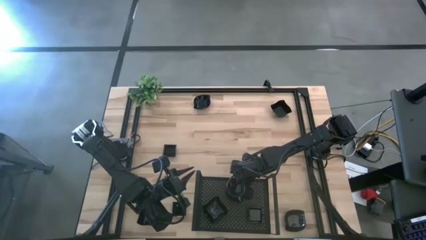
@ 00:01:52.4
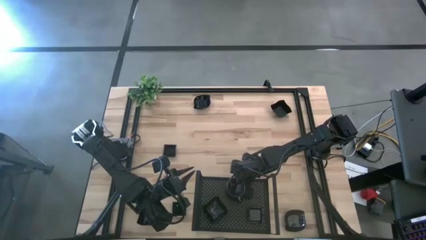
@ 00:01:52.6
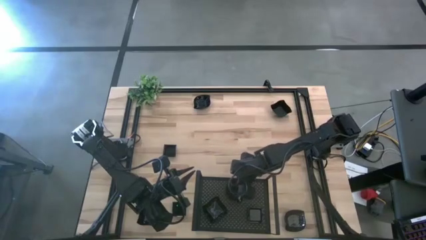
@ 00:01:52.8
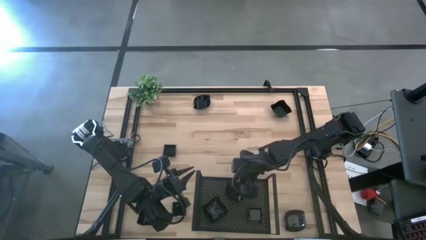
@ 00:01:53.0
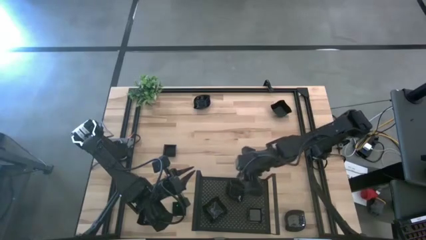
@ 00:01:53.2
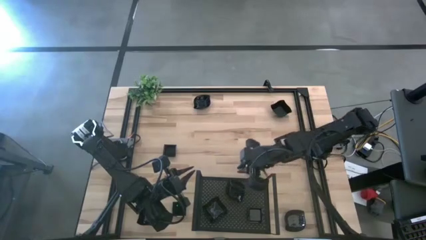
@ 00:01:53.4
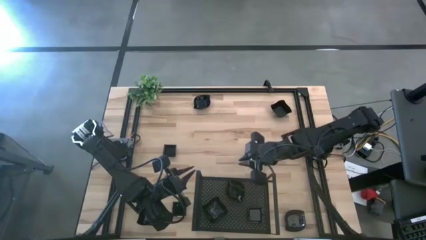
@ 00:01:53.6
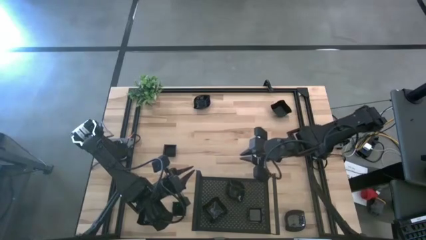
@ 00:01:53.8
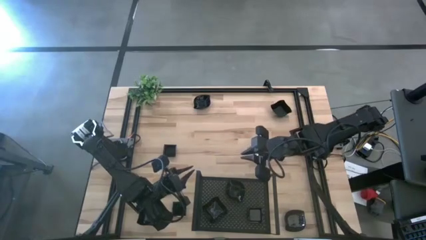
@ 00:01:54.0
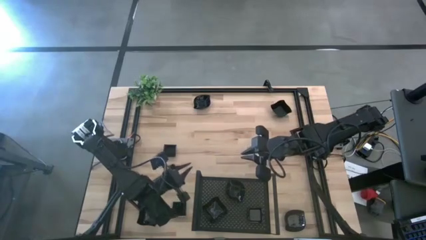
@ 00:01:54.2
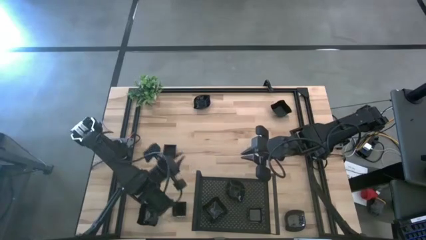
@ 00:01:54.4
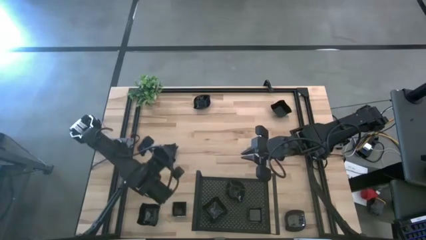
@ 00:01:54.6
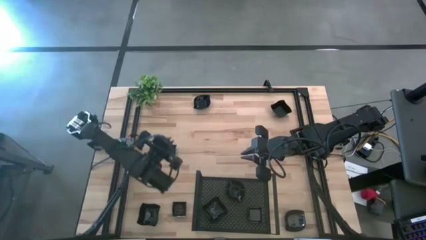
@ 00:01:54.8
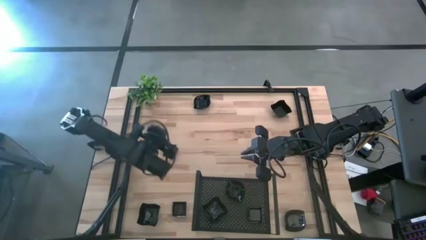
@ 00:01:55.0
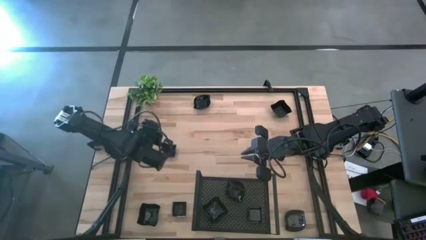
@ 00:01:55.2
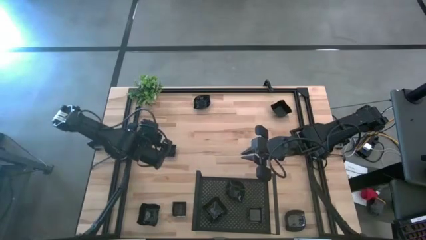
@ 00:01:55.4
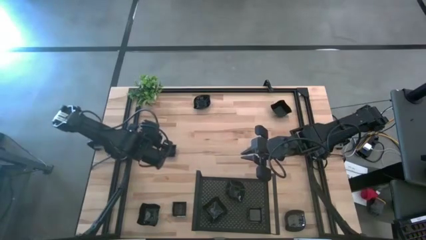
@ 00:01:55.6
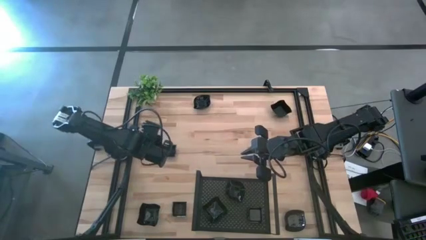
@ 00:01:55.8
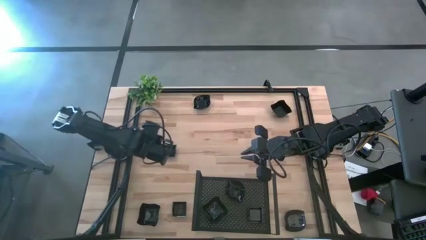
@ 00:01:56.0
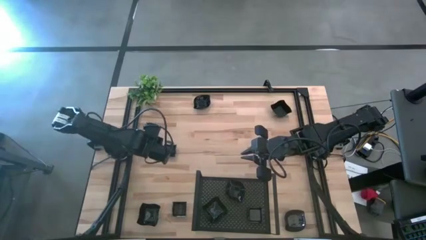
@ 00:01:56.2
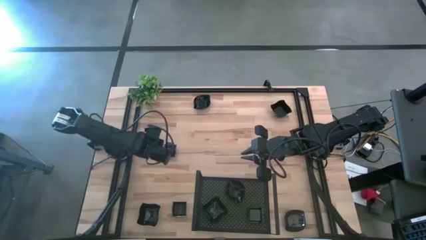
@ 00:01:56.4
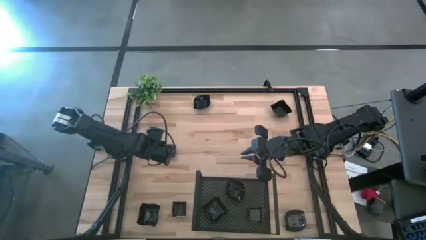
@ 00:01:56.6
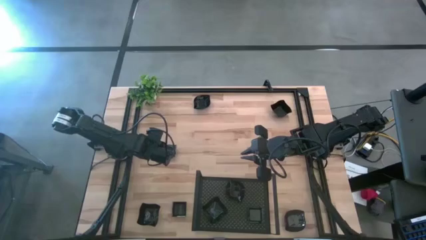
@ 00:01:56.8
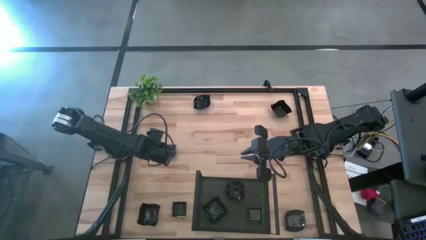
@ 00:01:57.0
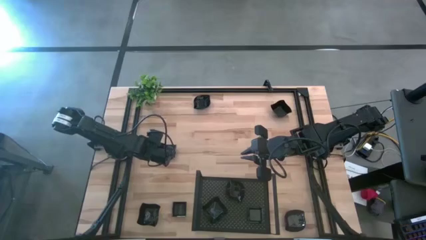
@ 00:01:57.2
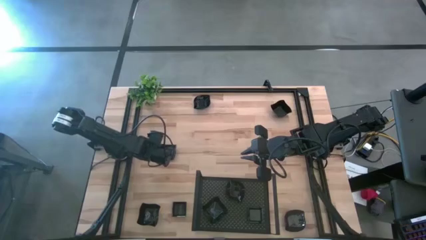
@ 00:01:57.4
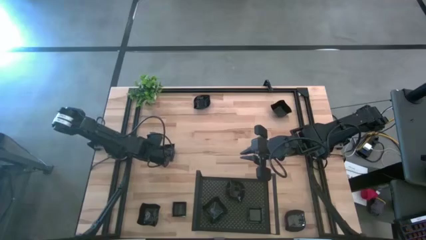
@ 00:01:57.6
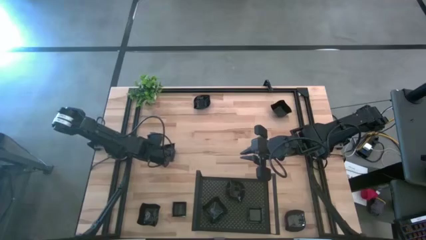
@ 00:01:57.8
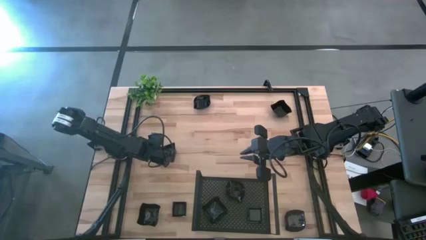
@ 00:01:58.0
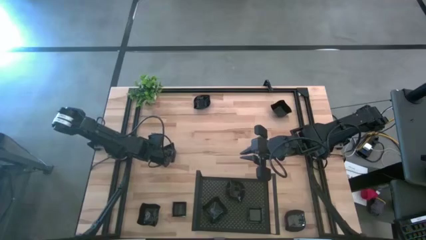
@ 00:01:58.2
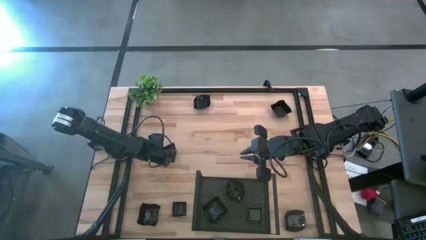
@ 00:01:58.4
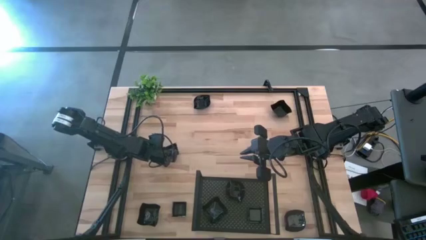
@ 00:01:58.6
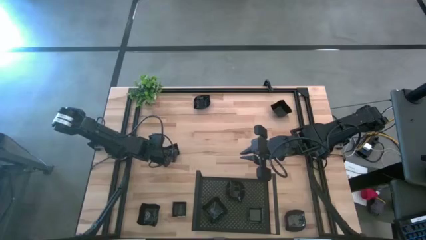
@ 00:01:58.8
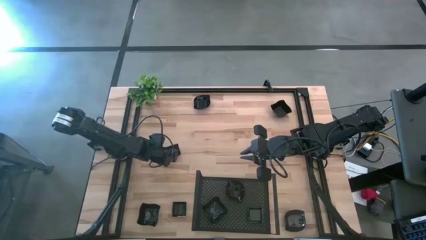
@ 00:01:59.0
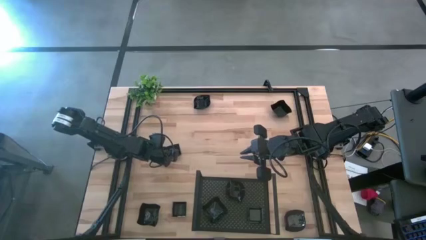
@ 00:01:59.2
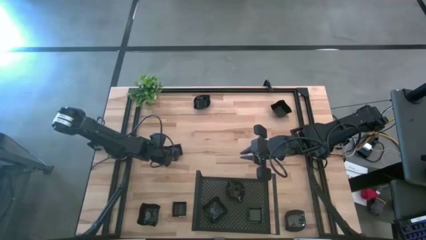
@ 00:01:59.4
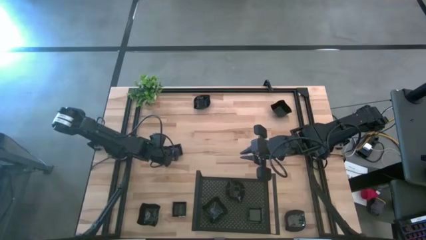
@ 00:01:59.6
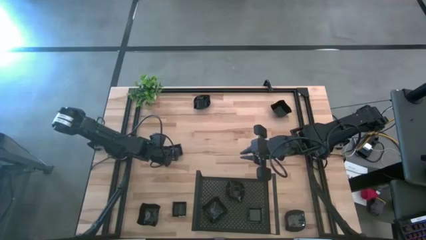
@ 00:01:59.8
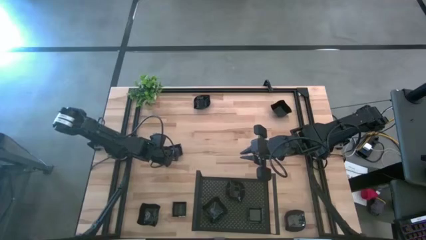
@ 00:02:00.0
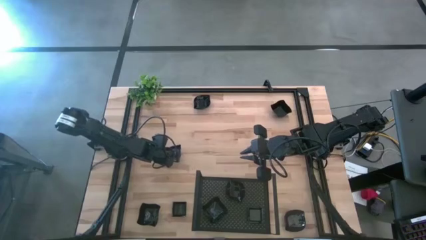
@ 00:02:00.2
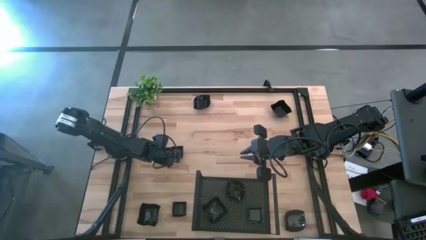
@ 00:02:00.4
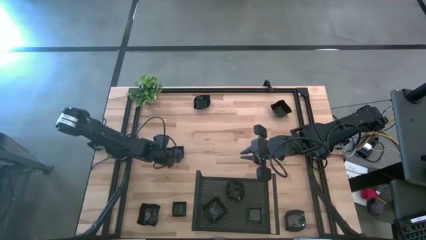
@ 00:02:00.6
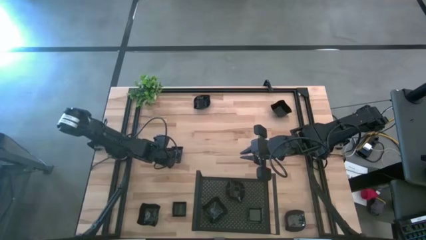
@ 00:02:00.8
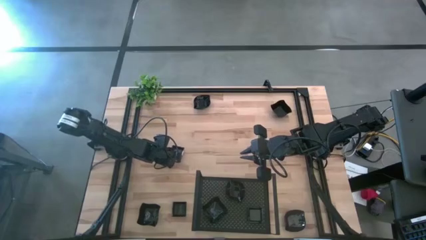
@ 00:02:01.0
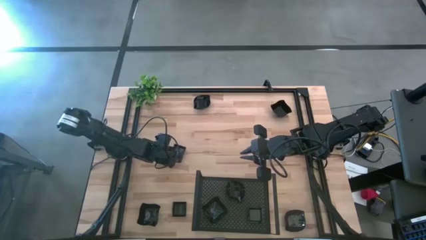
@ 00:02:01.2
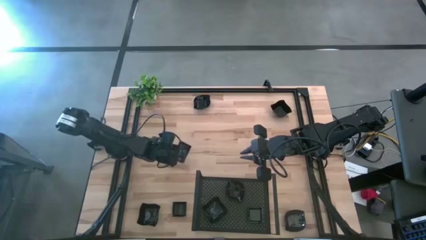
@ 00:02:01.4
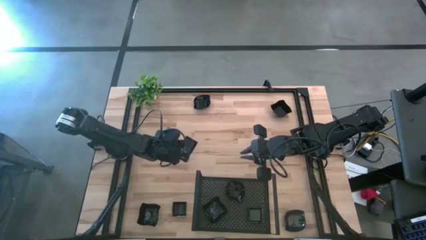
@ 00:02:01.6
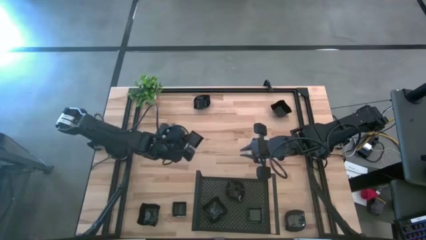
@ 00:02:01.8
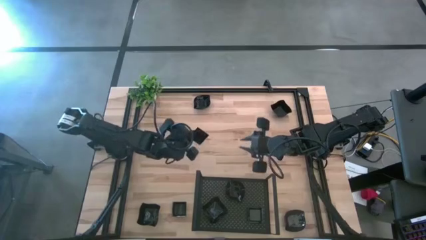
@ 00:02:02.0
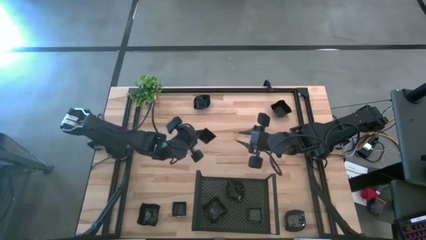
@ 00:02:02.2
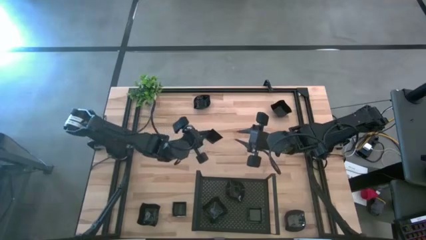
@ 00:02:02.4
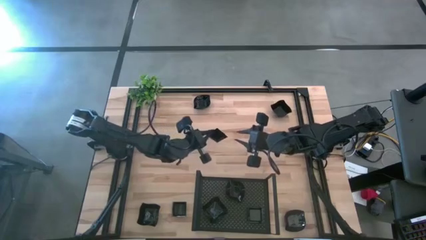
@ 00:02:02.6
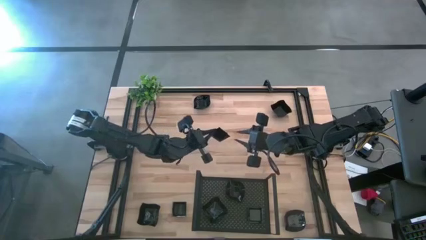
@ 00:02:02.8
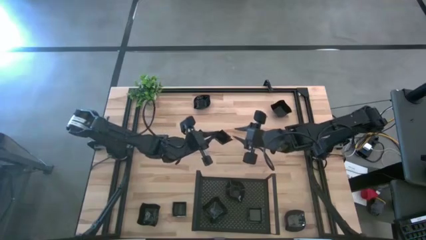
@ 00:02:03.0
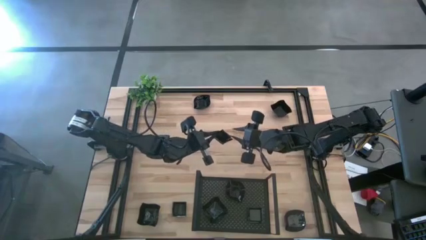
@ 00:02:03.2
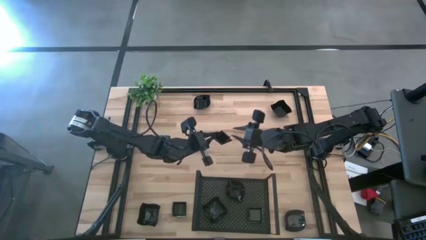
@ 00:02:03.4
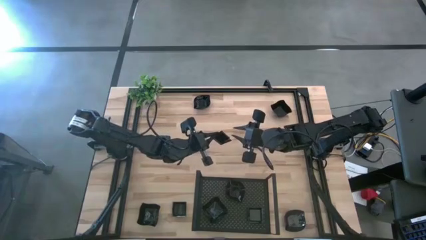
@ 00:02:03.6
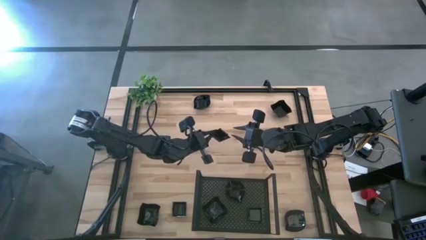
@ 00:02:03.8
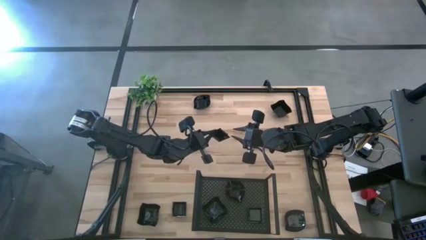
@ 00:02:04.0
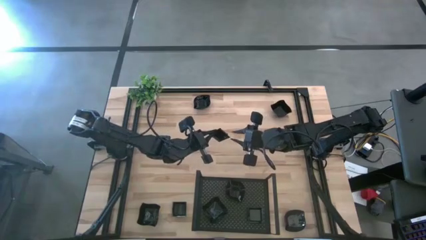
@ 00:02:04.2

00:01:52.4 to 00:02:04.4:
Task: Pick & Place Mini shaped plates
Stack the square plate on top of the other square plates on the shelf

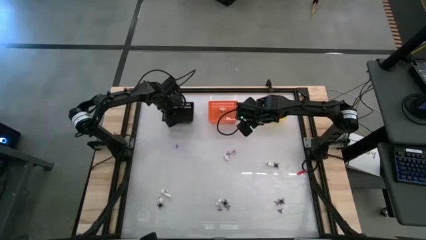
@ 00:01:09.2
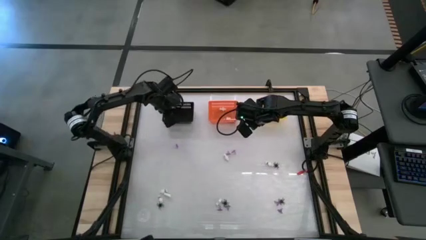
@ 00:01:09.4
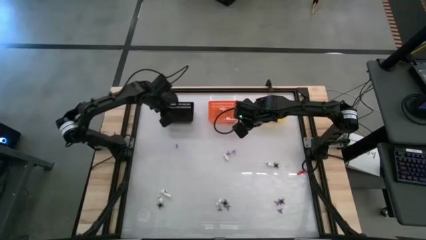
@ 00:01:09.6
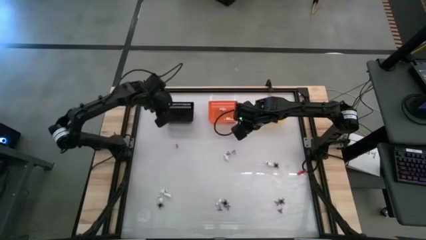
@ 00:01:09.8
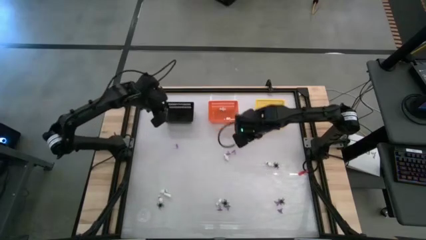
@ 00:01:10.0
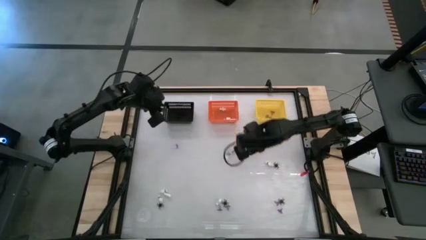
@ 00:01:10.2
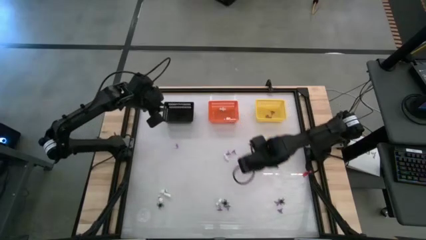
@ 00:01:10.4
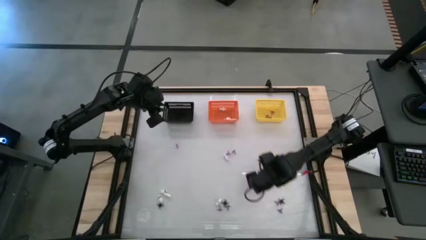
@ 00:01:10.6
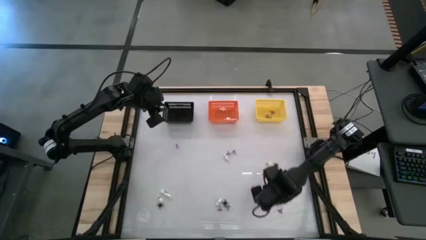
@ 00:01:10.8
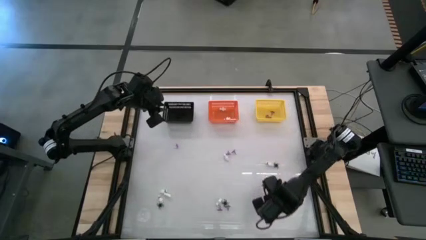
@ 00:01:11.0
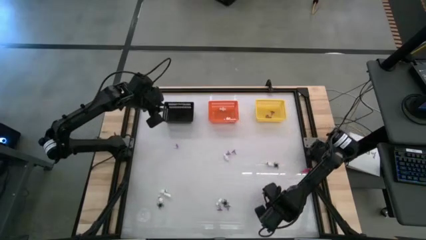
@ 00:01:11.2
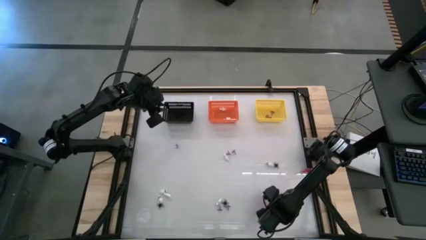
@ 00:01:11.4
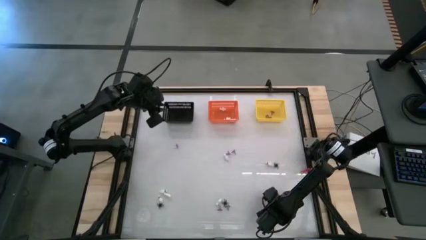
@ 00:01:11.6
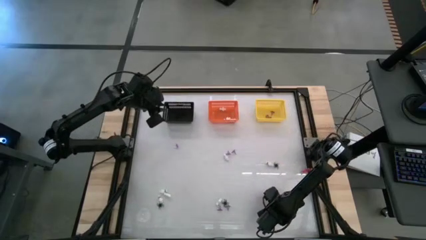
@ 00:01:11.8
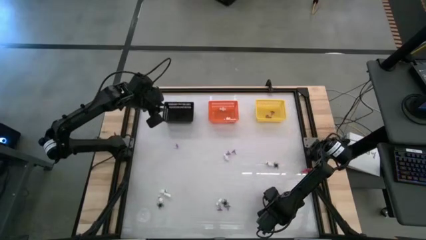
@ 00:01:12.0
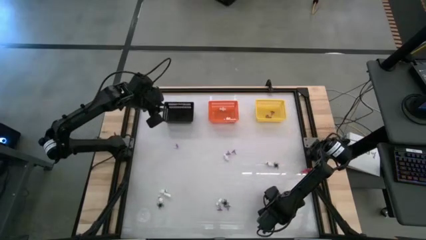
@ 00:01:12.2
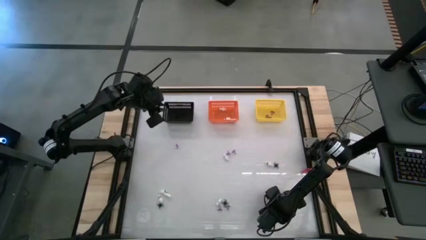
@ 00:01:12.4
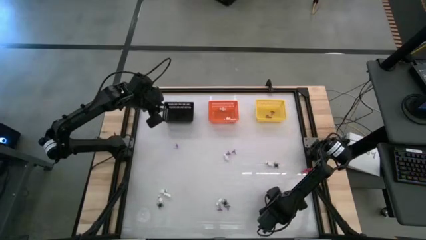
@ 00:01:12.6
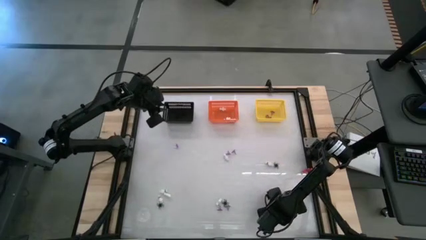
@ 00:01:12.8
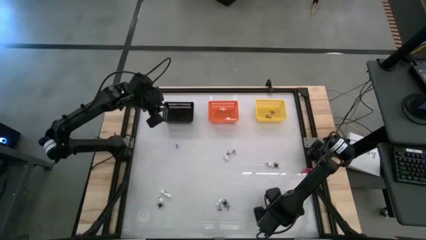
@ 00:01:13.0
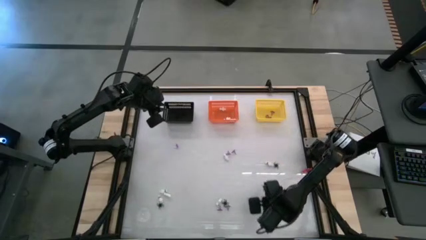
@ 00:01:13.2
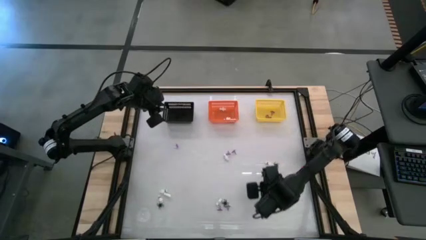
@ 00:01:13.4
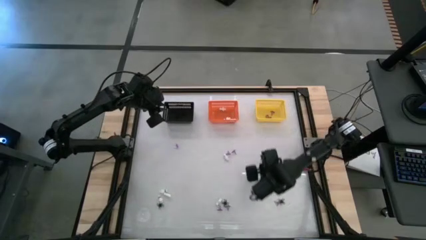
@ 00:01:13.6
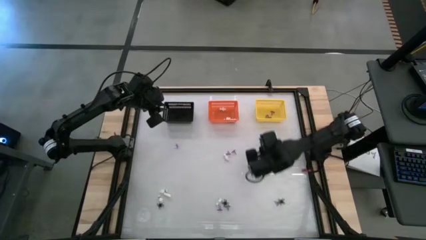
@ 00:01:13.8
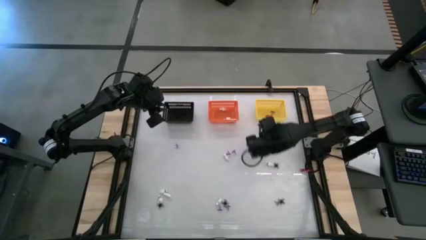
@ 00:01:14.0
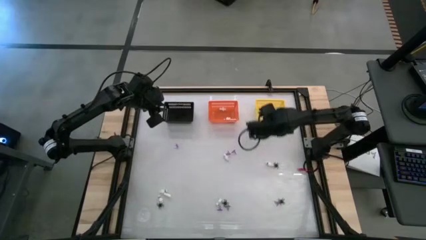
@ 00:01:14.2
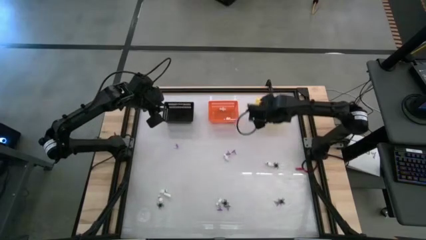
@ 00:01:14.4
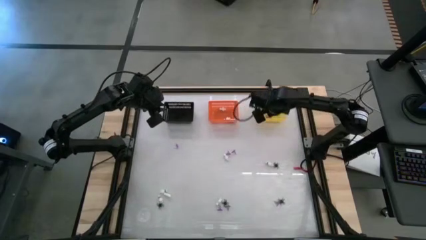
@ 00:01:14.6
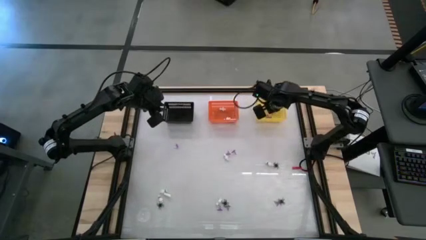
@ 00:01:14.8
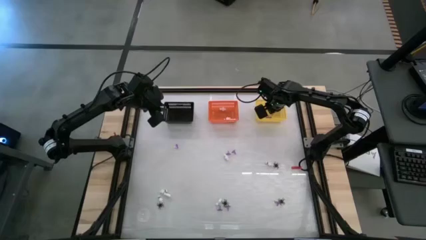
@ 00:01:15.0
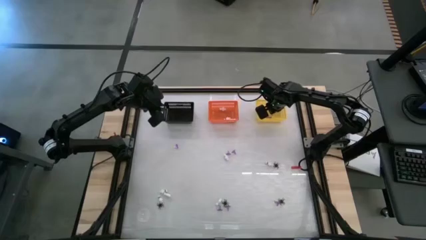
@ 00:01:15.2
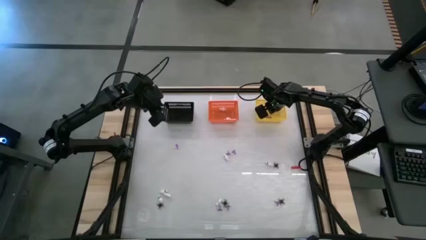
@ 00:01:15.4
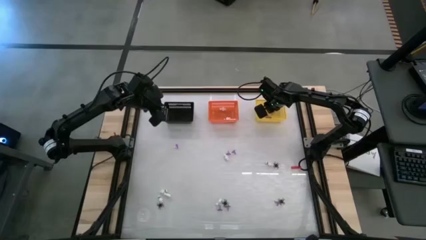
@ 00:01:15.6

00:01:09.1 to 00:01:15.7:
Task: Sort Halloween decoration
Put the witch hat toy into the yellow bin
